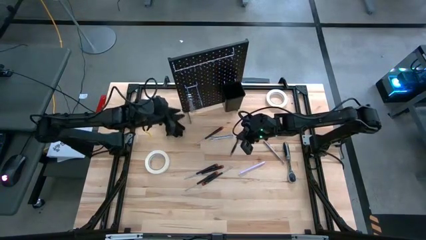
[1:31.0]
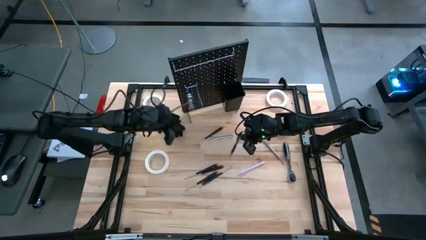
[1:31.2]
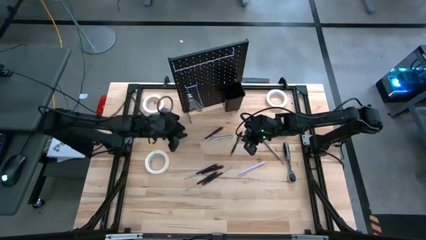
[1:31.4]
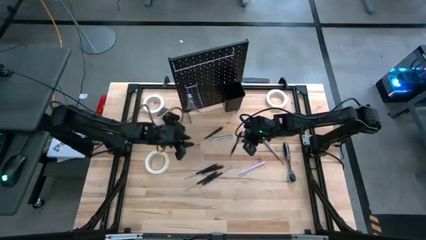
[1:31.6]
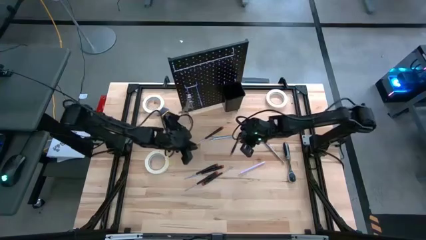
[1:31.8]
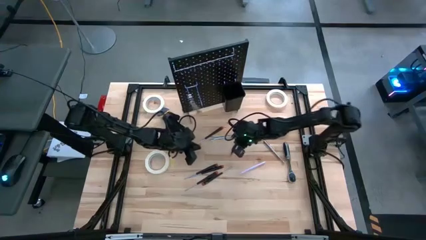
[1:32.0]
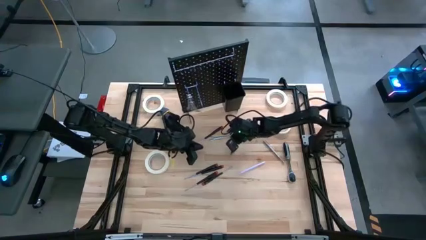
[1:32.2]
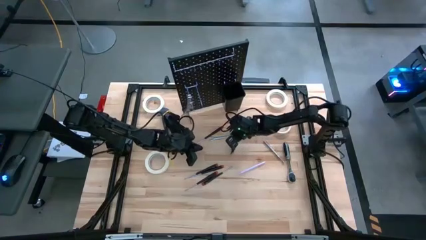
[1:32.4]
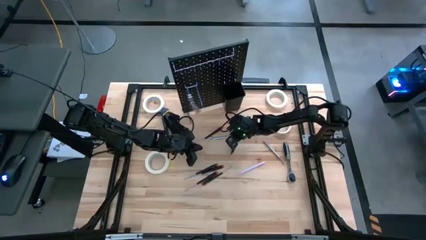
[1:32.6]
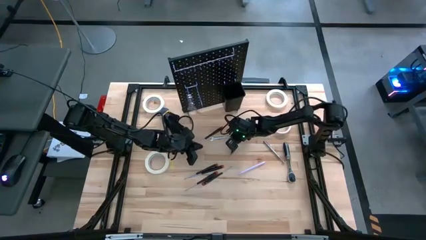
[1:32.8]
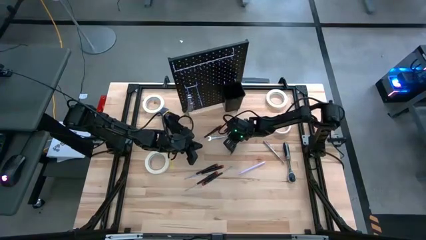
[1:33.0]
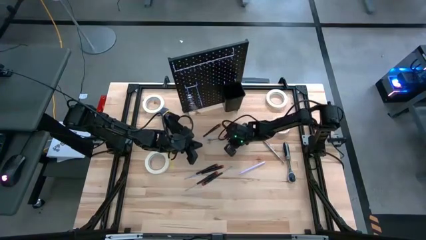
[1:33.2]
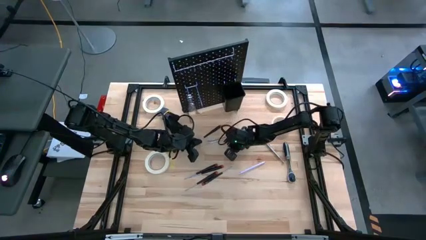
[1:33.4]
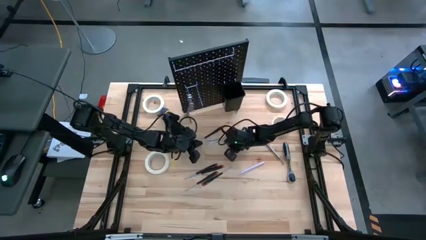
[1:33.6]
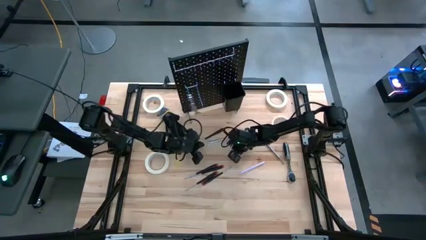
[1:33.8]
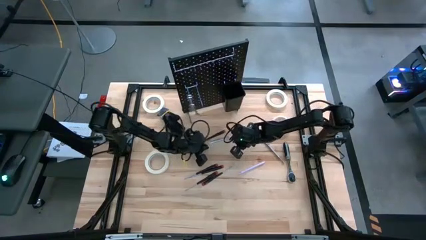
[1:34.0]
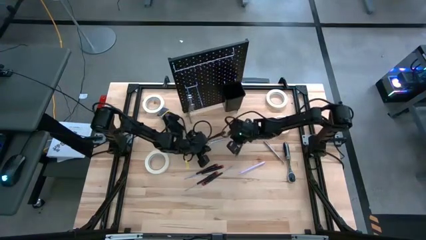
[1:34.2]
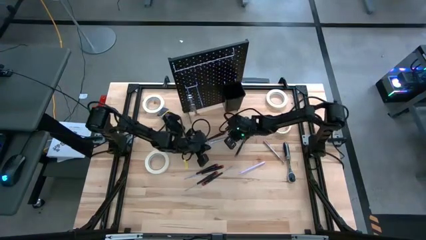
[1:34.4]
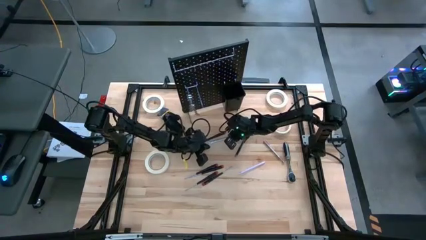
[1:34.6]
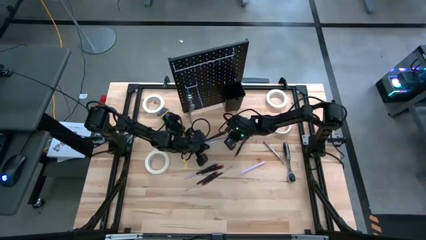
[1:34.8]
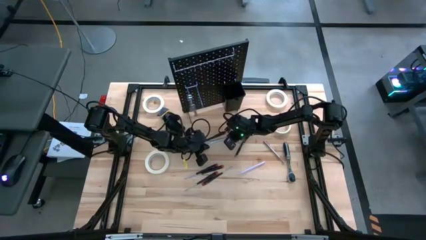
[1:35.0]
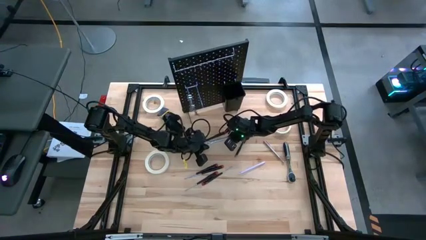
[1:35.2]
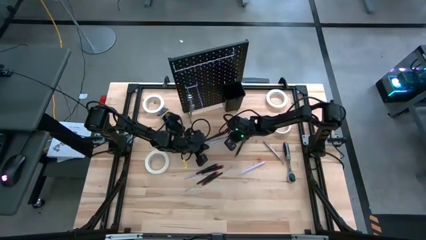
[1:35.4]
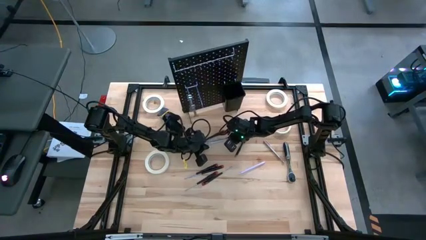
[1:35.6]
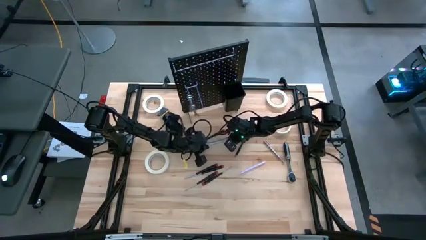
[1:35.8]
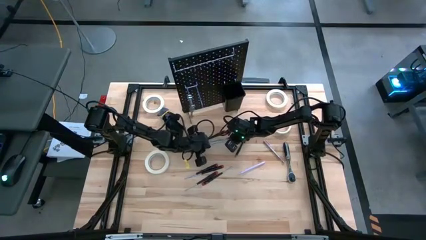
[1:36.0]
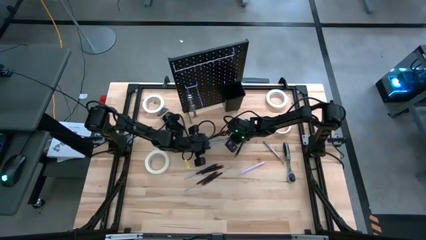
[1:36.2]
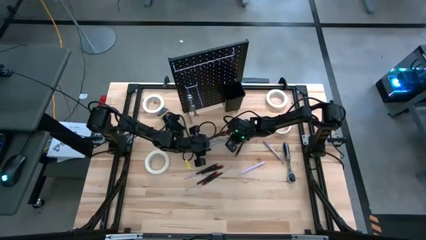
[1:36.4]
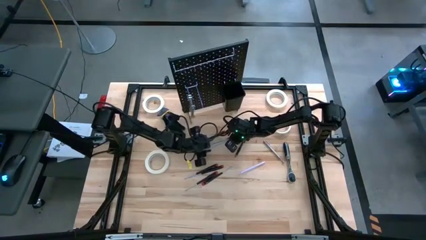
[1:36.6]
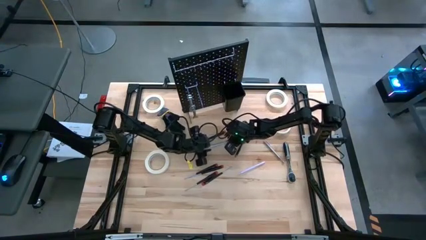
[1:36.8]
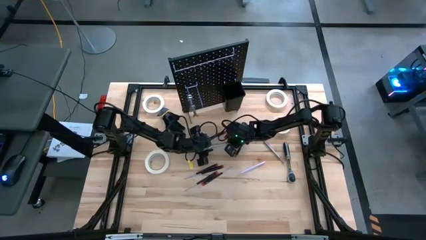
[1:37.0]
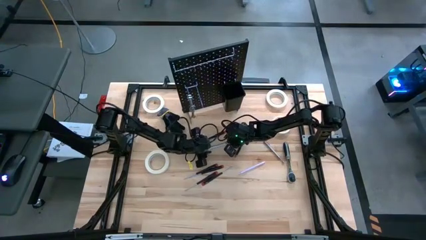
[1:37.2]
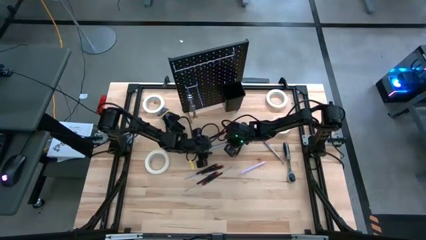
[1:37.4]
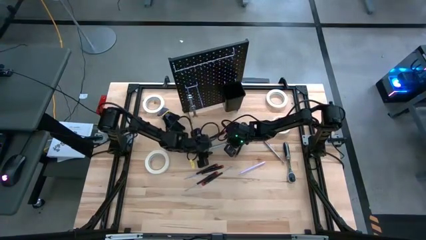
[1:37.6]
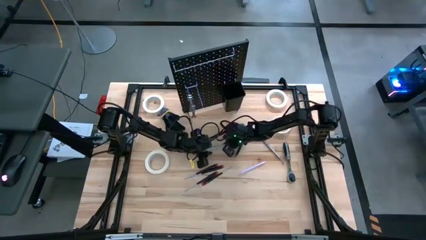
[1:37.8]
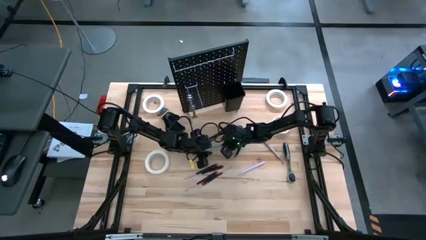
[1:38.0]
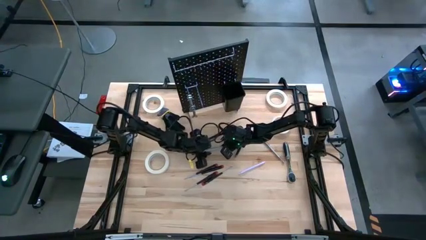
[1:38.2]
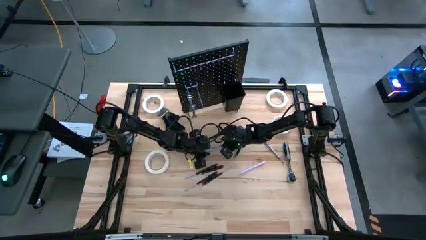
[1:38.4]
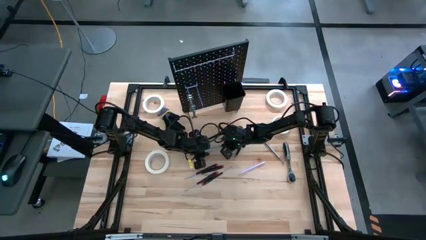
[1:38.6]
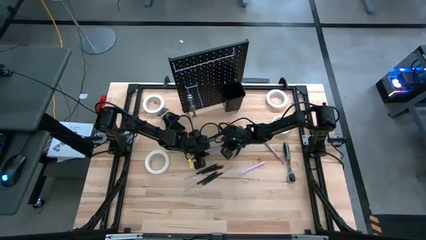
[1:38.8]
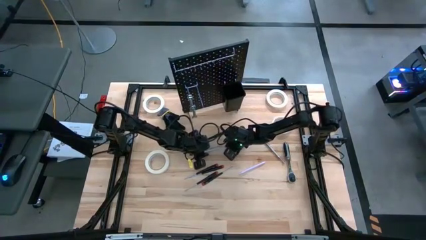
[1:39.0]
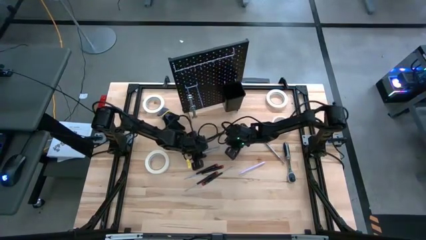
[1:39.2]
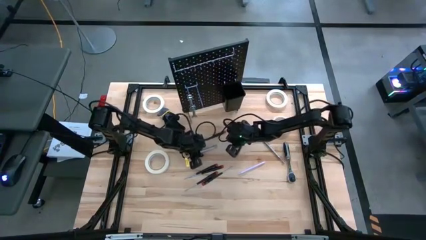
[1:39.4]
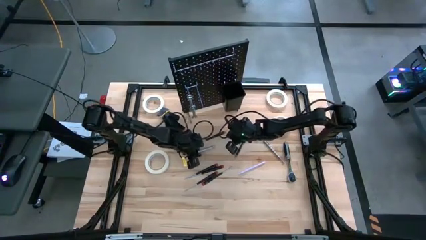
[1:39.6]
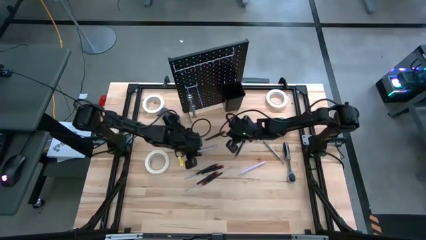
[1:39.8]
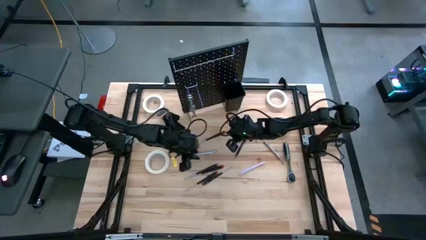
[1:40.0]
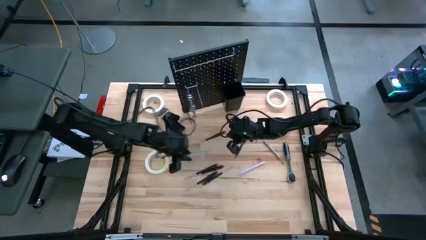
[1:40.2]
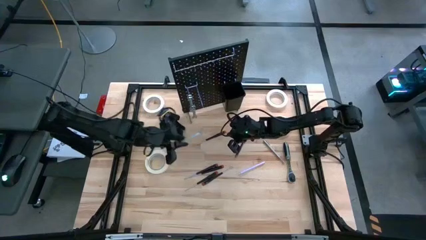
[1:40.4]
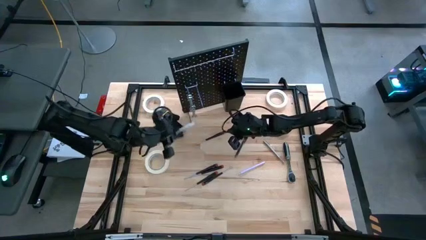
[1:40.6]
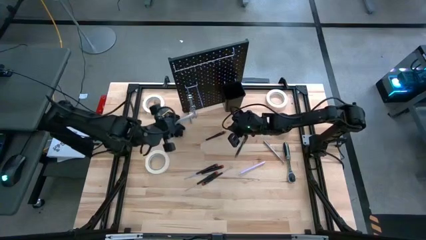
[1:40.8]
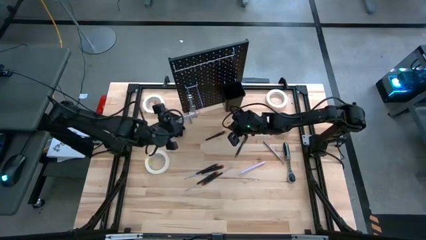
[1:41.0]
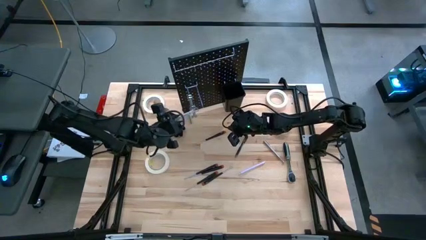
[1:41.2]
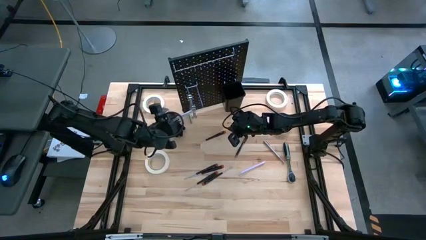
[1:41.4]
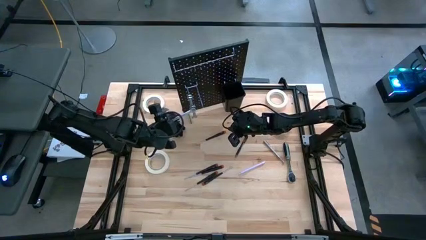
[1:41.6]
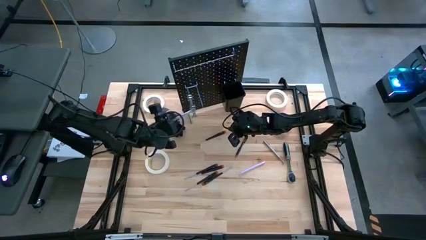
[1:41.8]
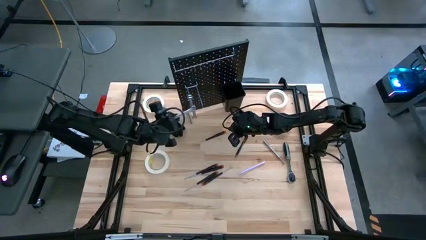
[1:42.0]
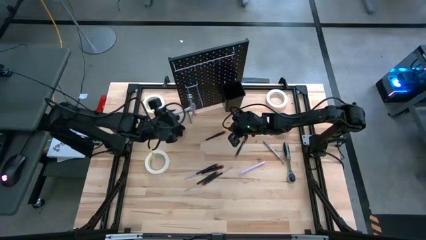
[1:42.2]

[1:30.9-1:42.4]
Task: Hang tools onto peg board
Hang the silver wrench on the peg board
